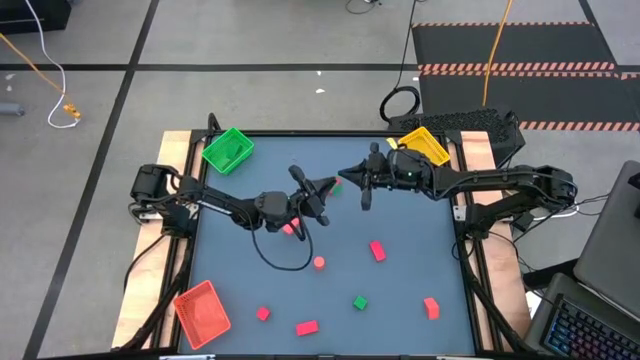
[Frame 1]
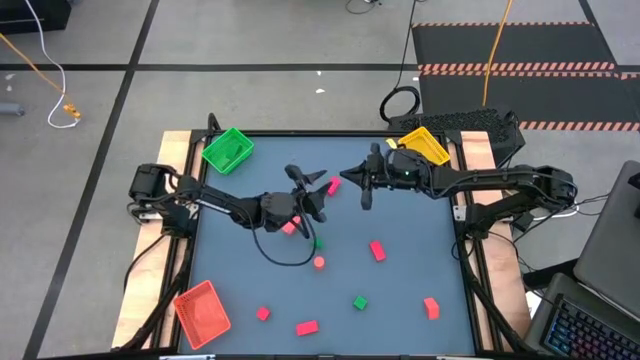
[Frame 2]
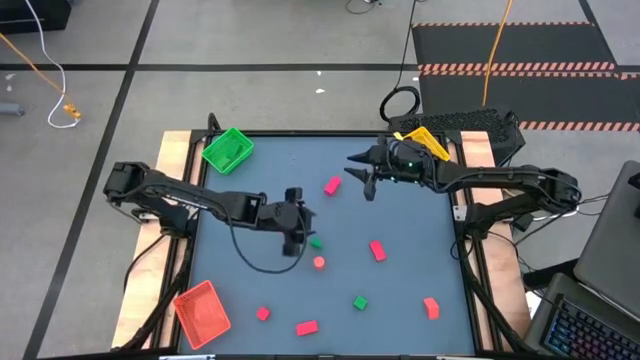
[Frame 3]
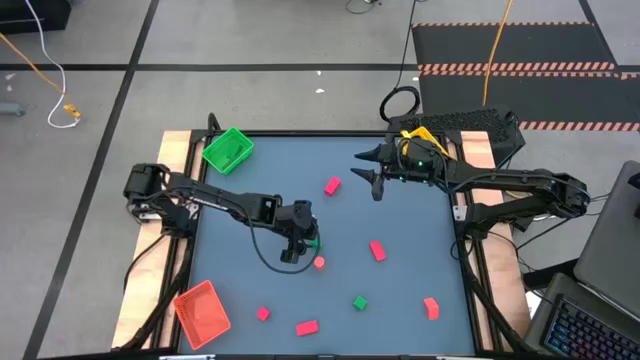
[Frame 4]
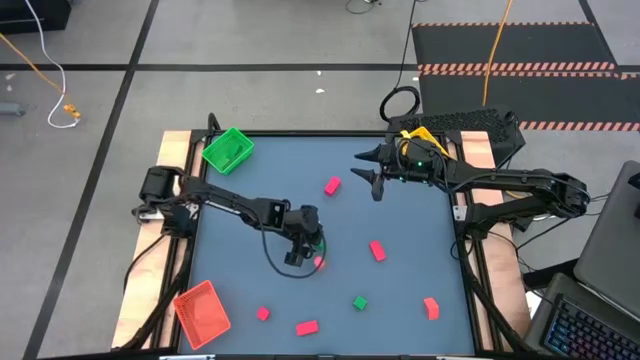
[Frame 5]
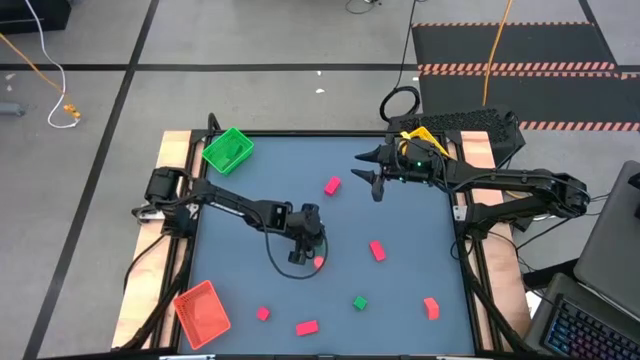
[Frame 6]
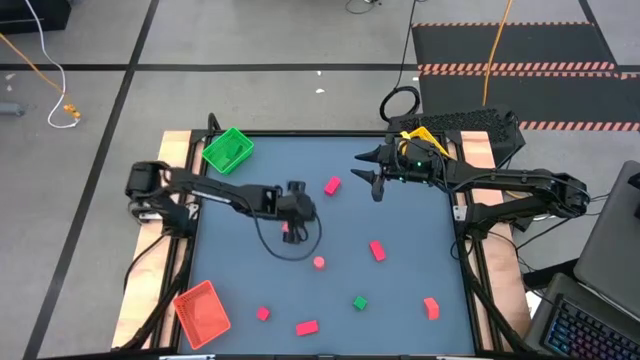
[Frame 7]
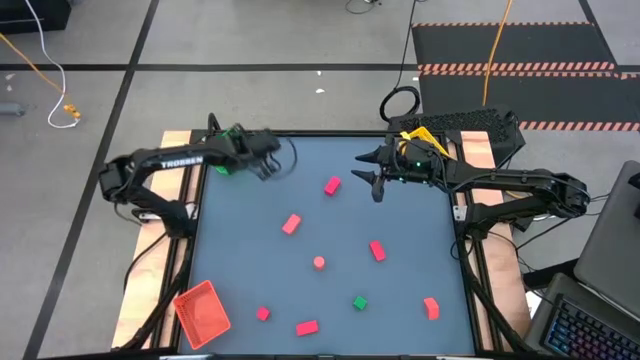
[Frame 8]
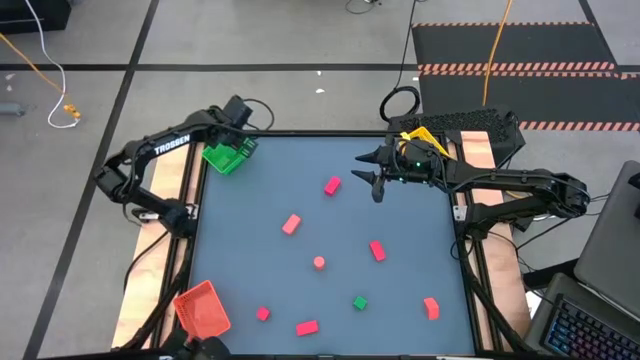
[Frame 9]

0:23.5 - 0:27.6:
Task: Sort & place blocks by color
Put the green block into the green bin

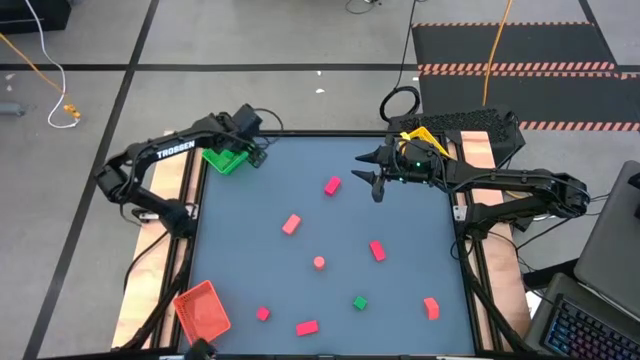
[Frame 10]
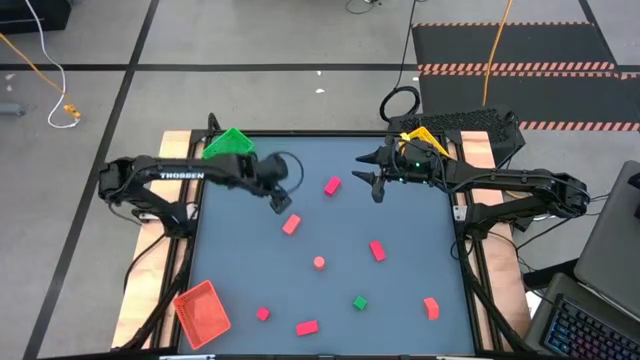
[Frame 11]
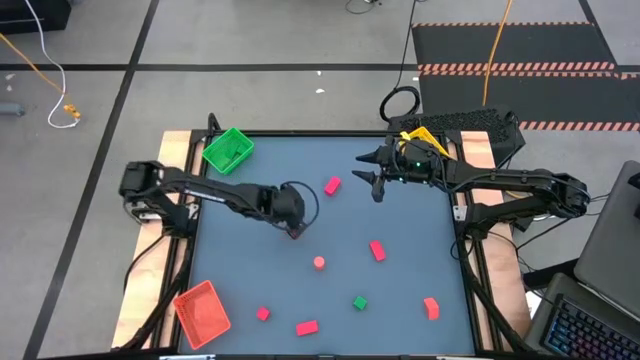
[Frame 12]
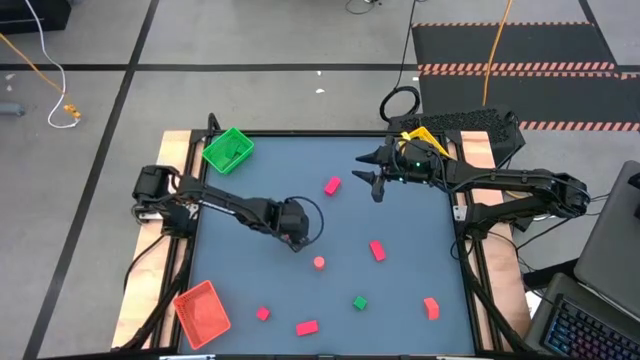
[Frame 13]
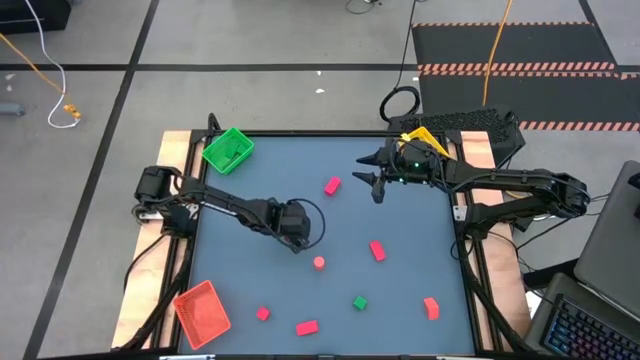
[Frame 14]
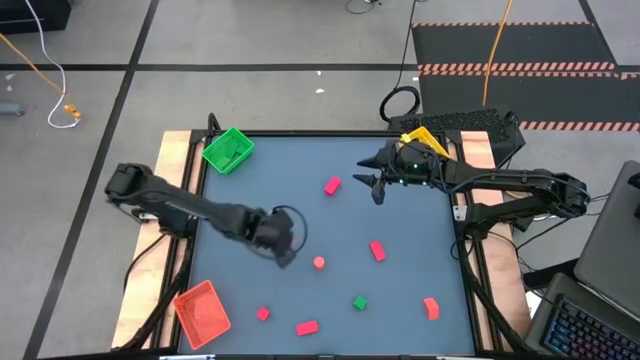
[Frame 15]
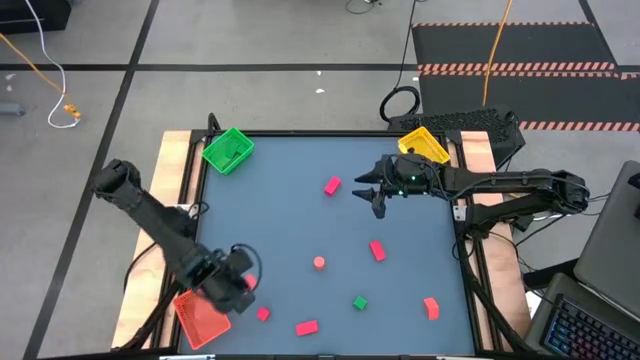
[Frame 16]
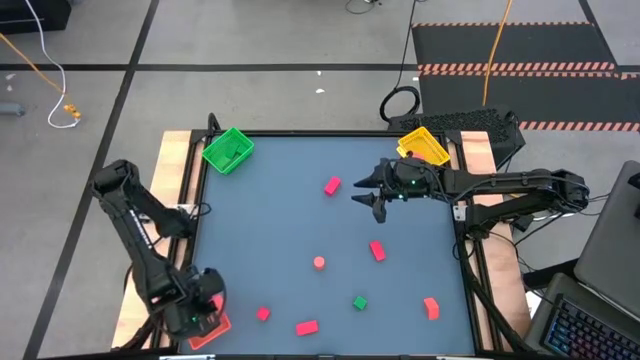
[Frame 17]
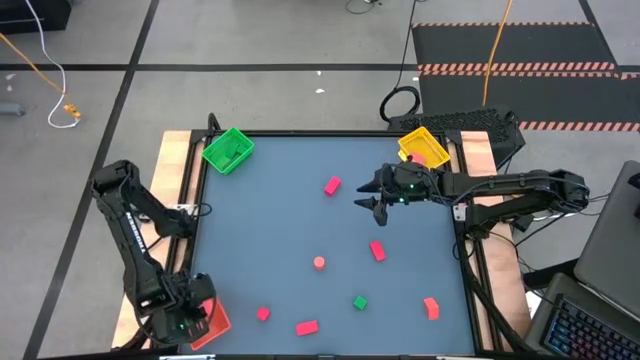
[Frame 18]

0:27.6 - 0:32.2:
Put the orange block into the orange bin

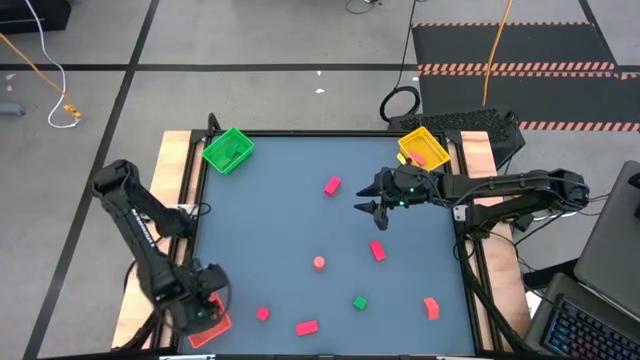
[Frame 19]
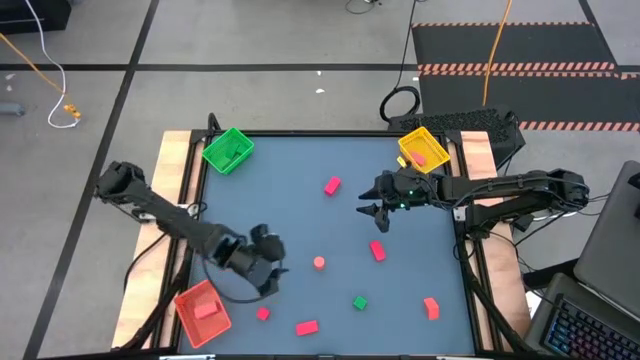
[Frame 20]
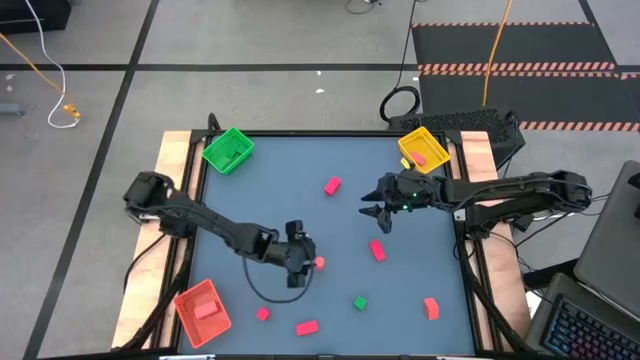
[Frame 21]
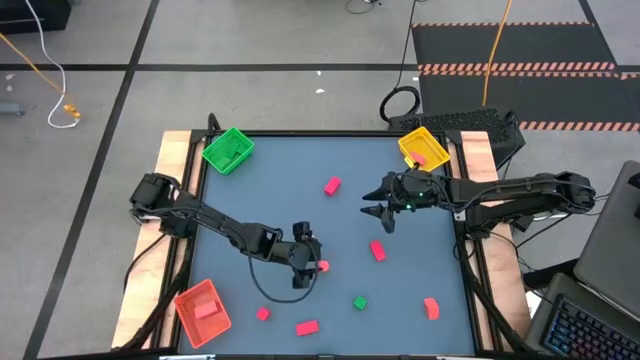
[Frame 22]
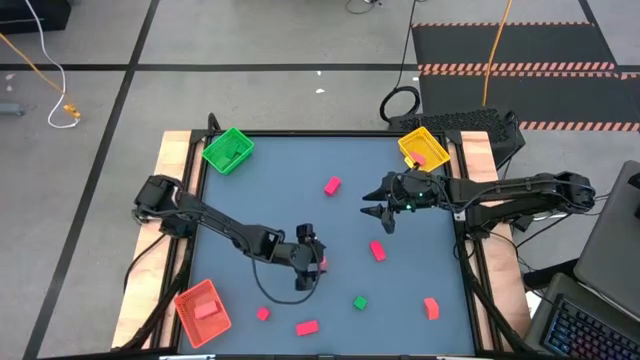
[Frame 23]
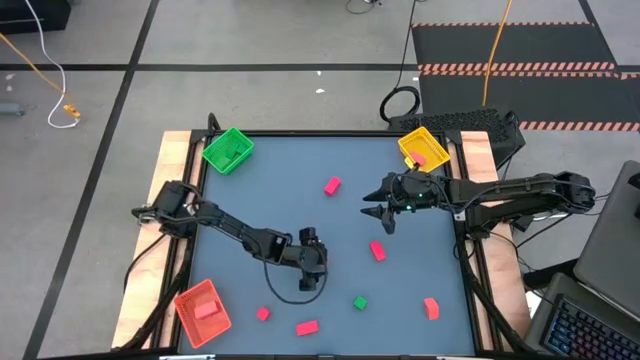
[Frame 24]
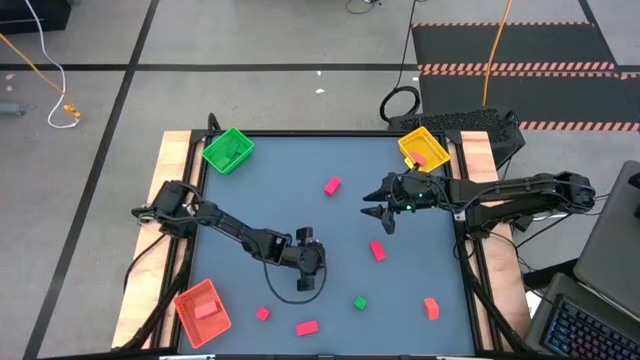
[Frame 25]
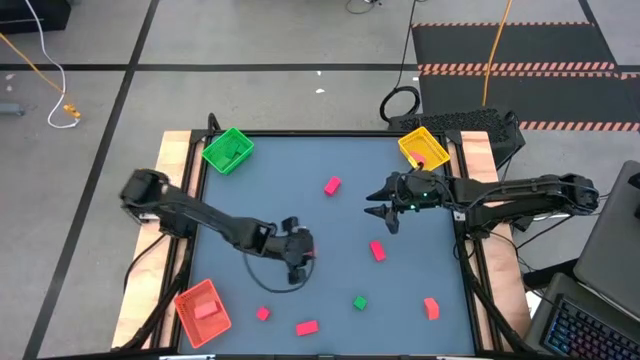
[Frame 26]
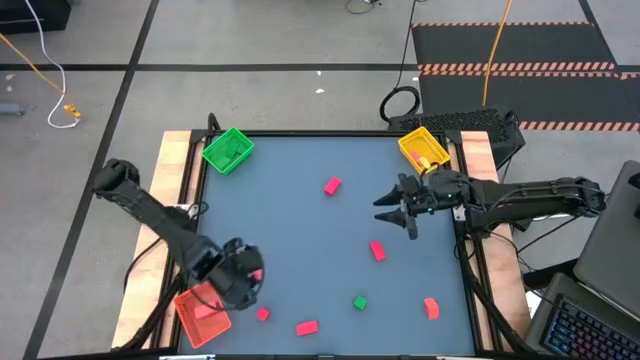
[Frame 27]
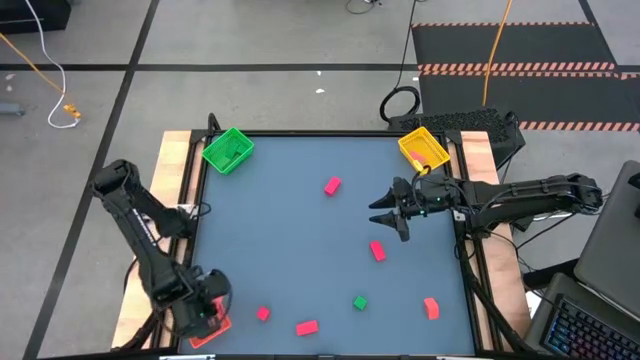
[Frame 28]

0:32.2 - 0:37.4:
Put the orange block into the orange bin

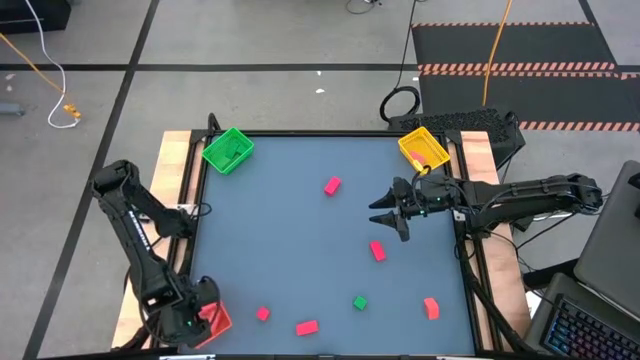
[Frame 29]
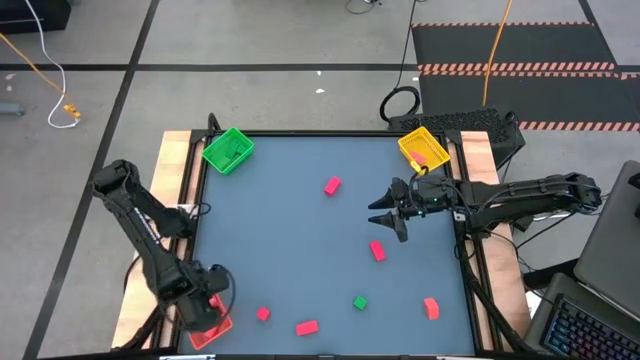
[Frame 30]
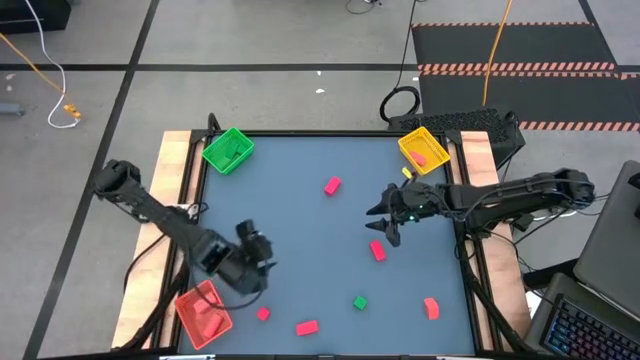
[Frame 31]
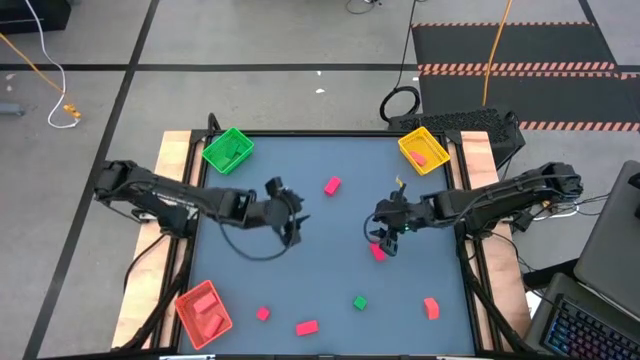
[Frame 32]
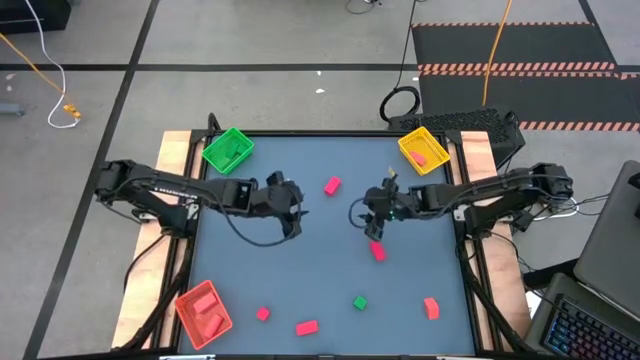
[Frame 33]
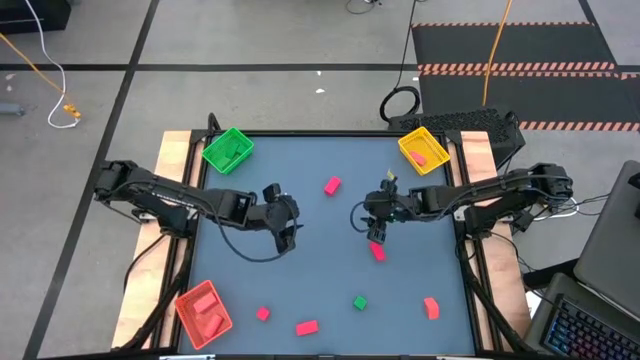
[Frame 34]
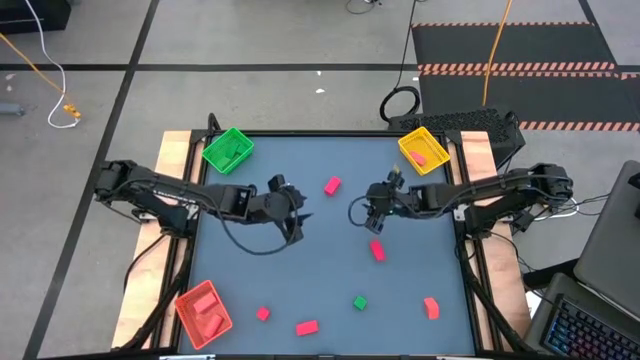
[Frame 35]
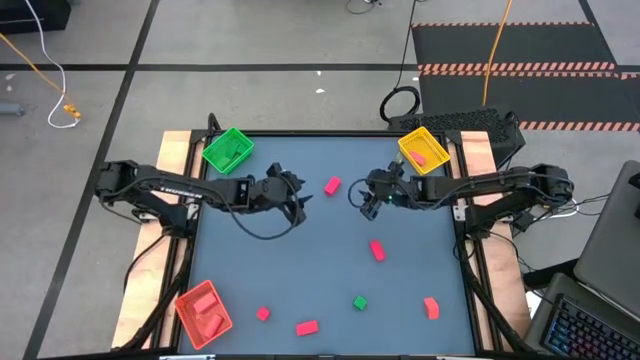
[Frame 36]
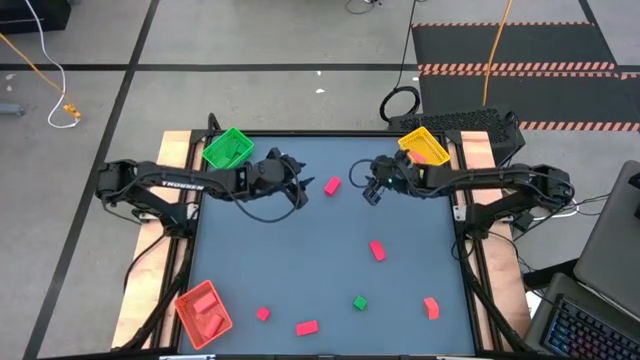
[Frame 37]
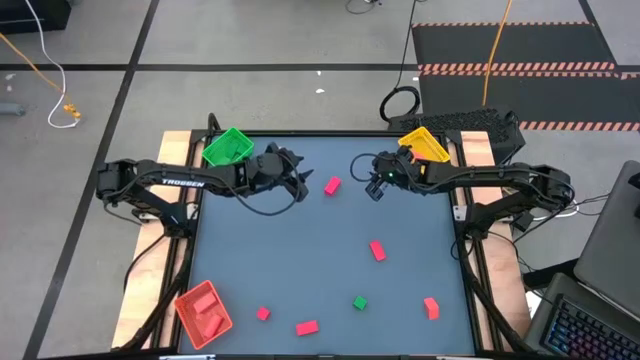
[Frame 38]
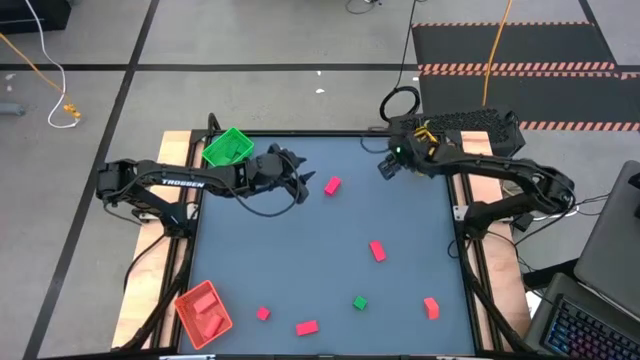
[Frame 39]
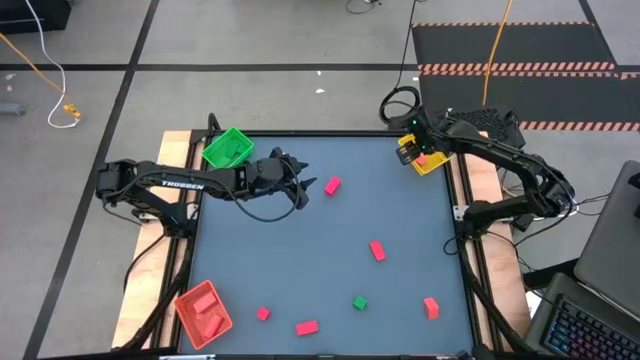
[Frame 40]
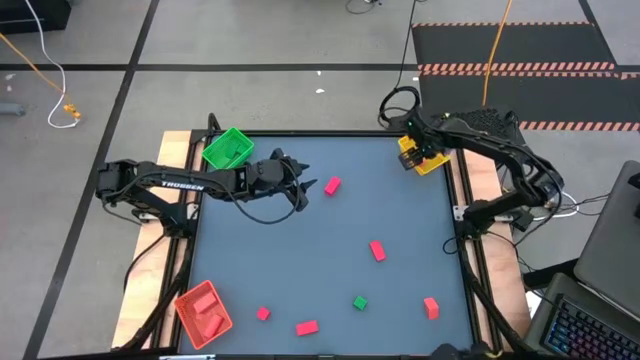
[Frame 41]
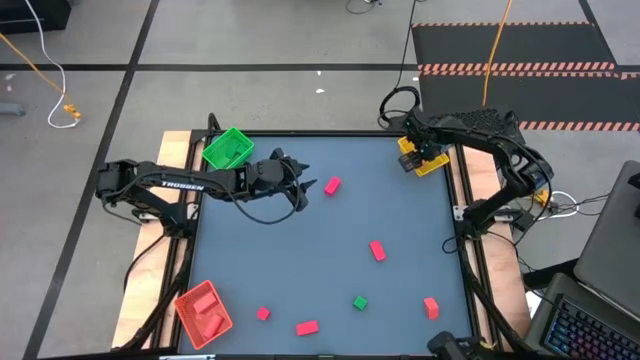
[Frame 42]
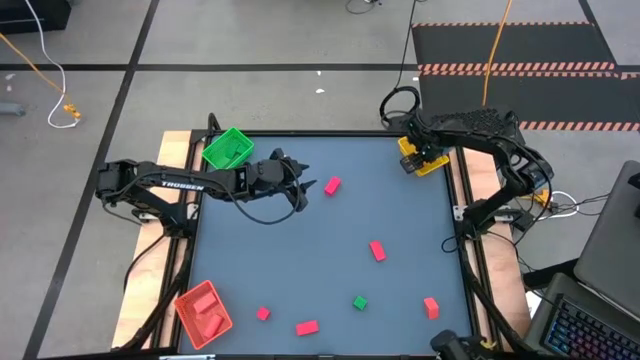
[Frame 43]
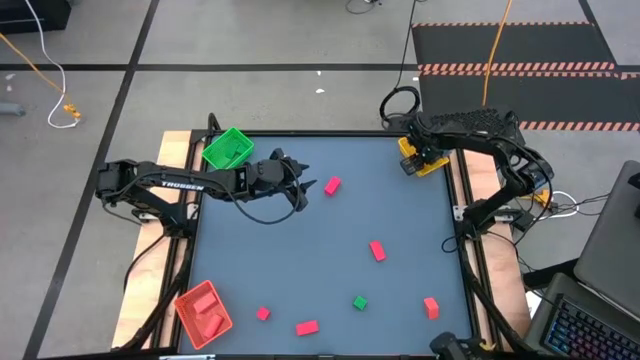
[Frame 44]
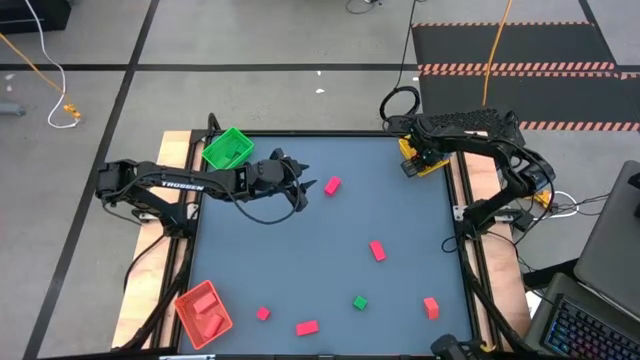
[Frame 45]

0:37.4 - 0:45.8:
Put the orange block into the orange bin
